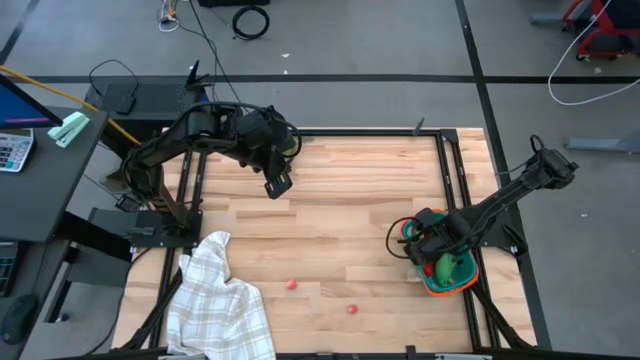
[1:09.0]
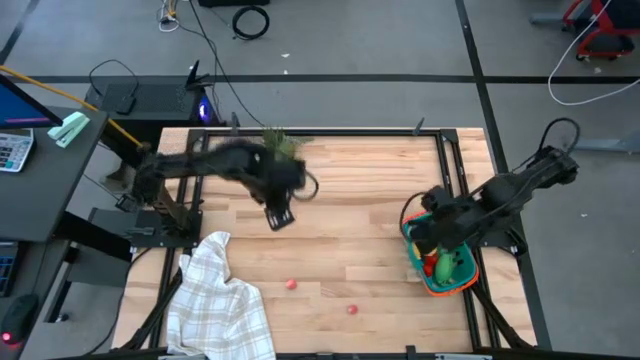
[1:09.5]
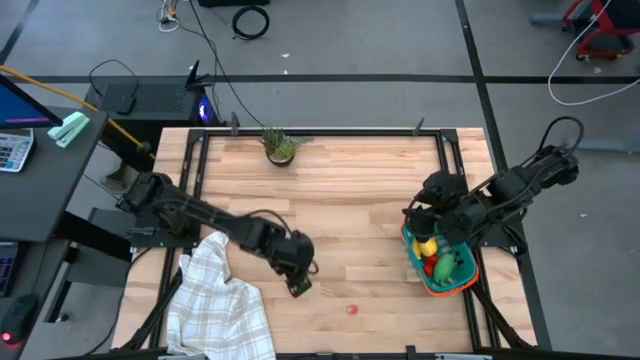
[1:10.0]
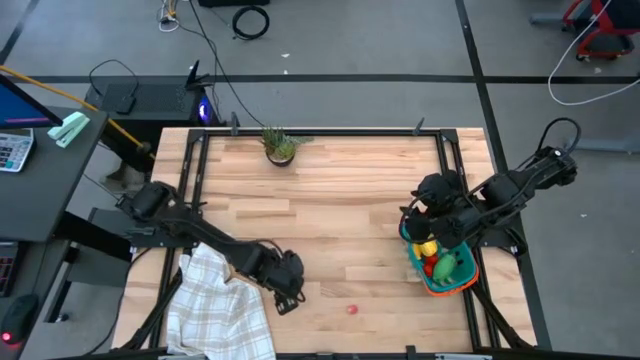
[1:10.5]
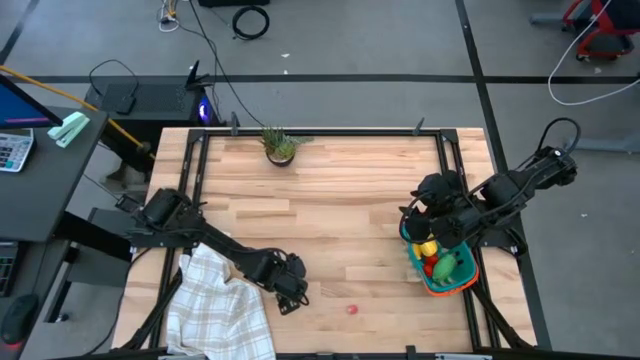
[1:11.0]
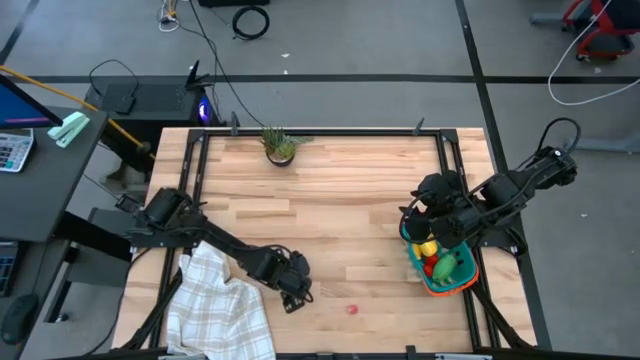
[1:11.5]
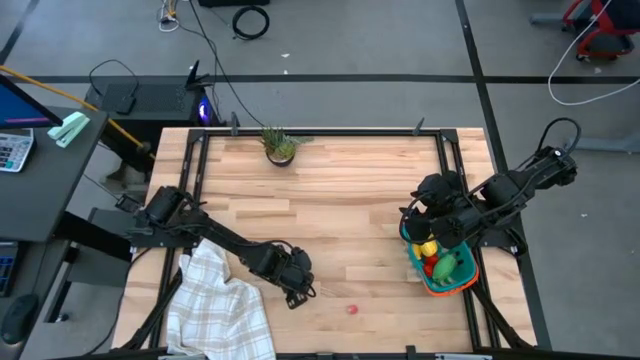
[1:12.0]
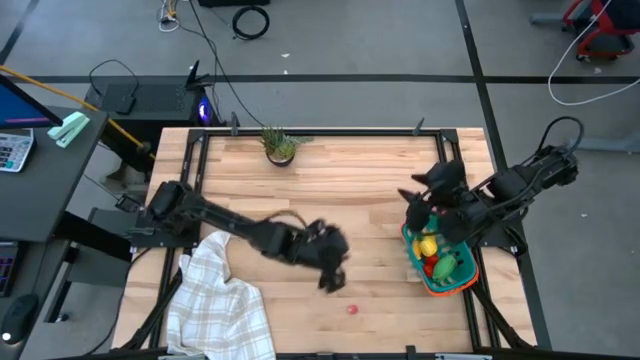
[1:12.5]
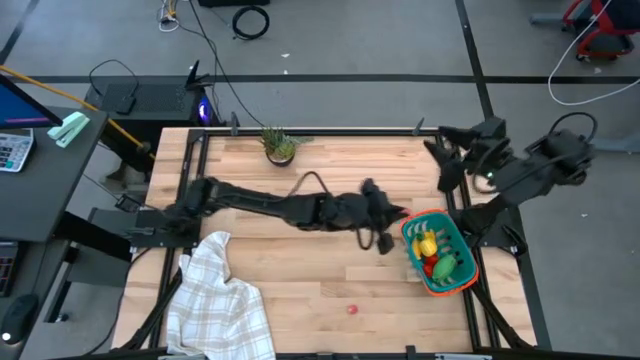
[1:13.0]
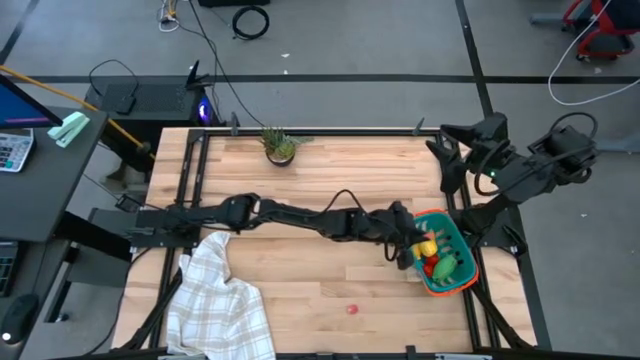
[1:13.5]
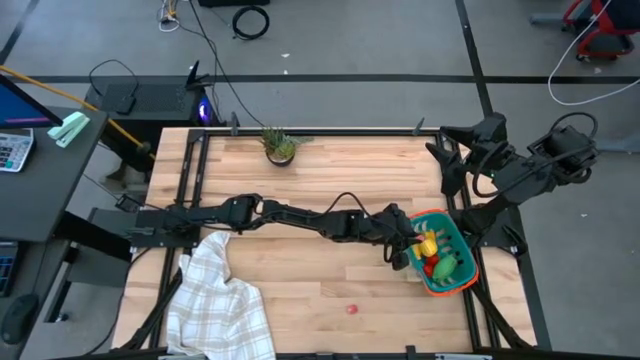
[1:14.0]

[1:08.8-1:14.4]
Task: Pick and placing Produce into tupperware
Put the left pink peach into the blue basket

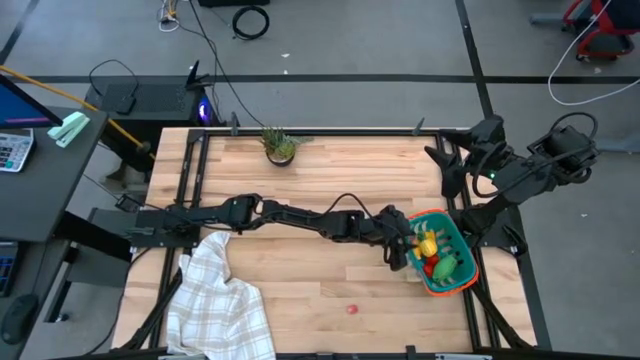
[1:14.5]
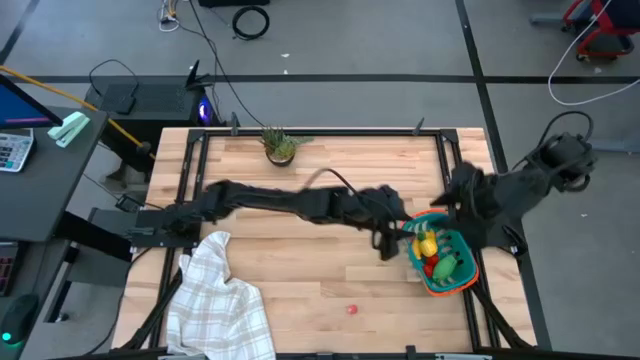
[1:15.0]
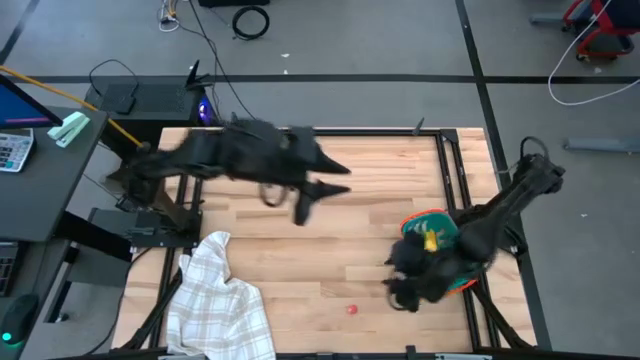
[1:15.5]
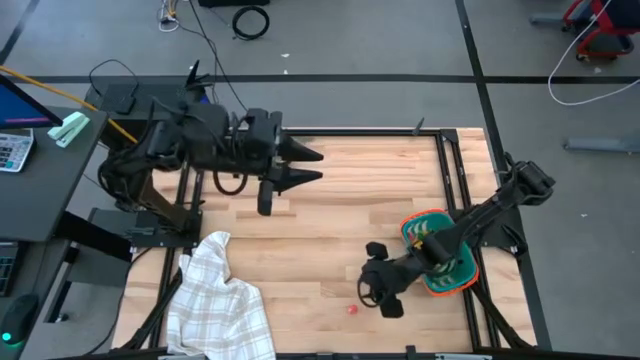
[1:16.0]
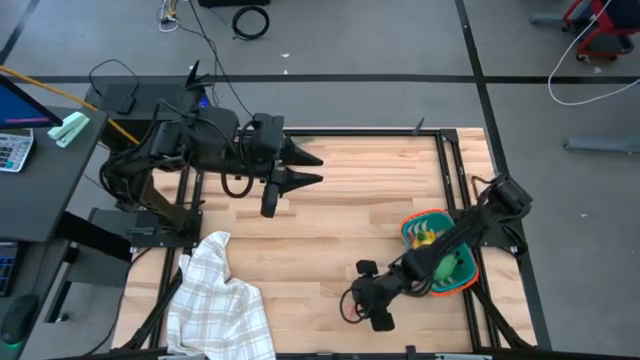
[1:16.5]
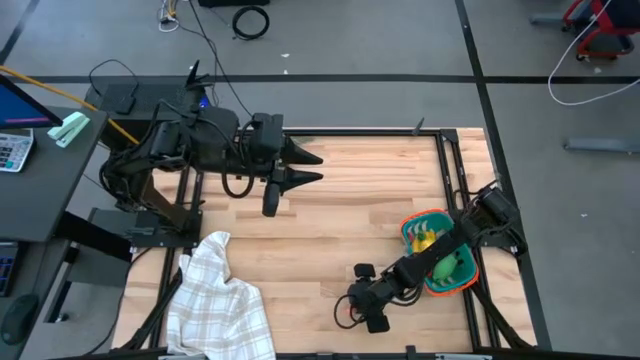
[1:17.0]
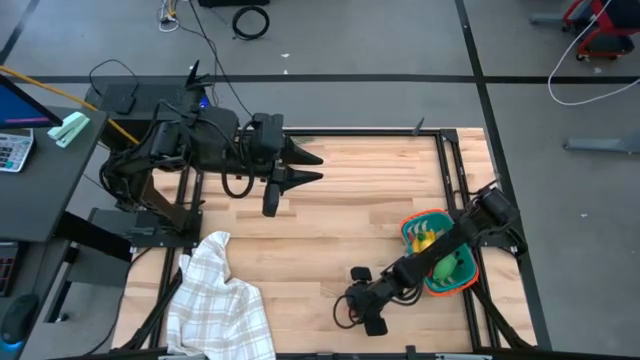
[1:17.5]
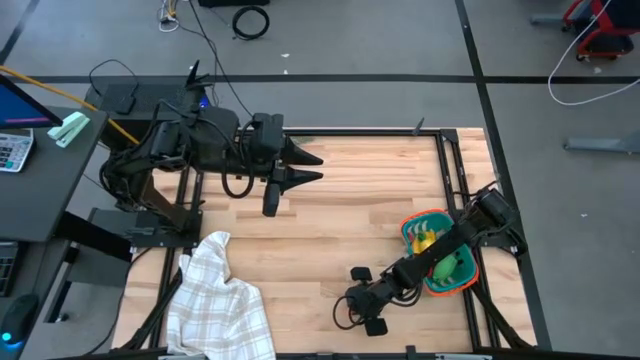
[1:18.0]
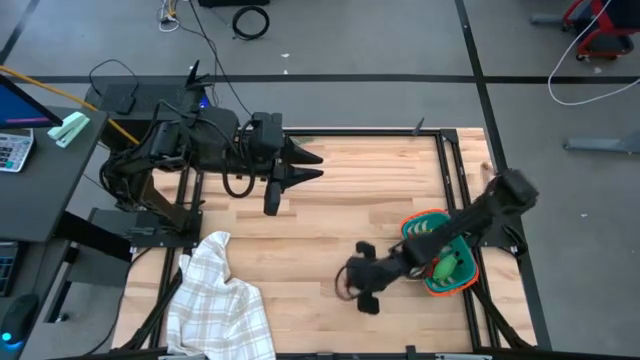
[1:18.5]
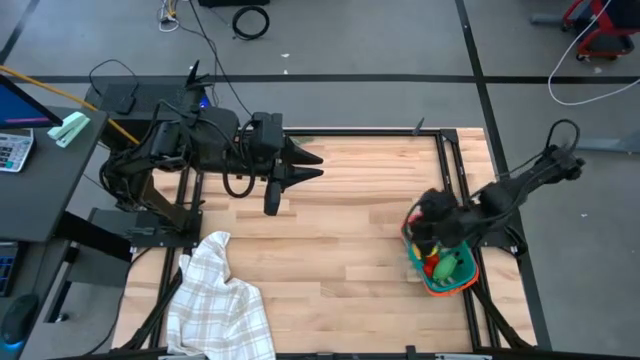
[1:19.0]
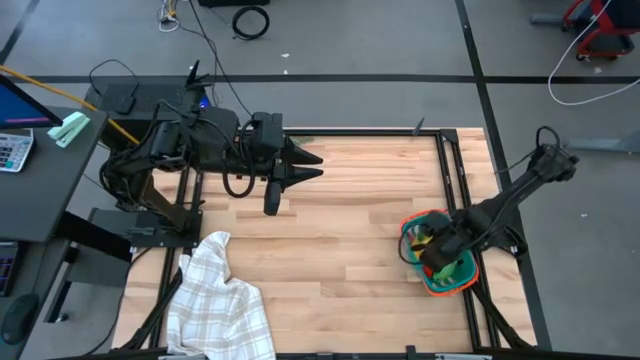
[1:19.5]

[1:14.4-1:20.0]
Put the pink peach into the blue basket

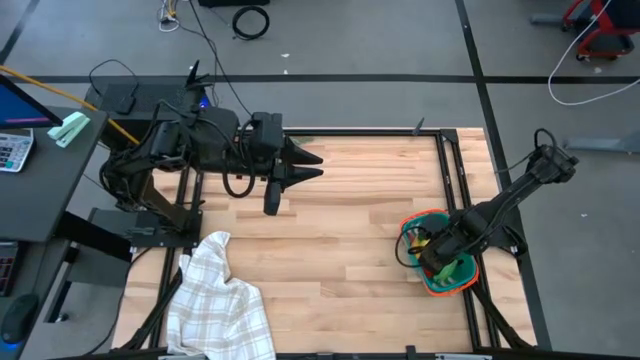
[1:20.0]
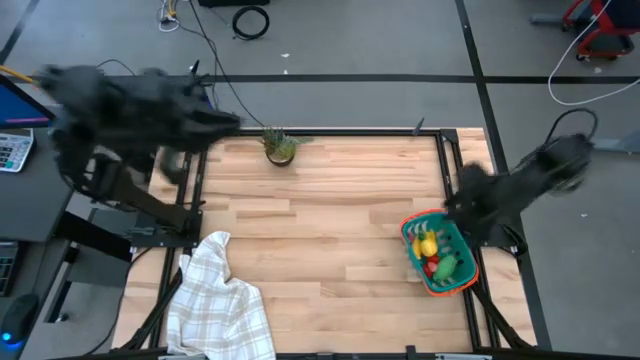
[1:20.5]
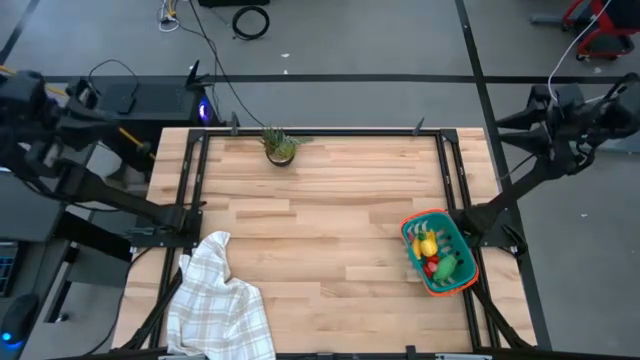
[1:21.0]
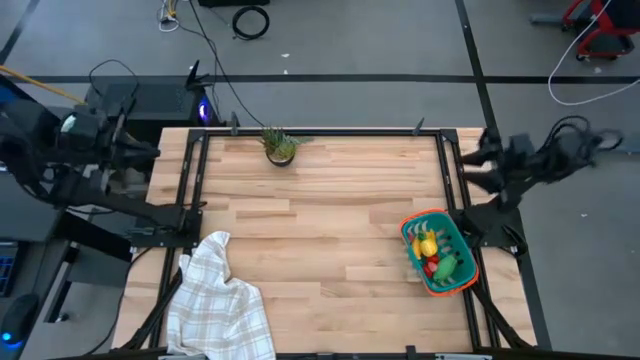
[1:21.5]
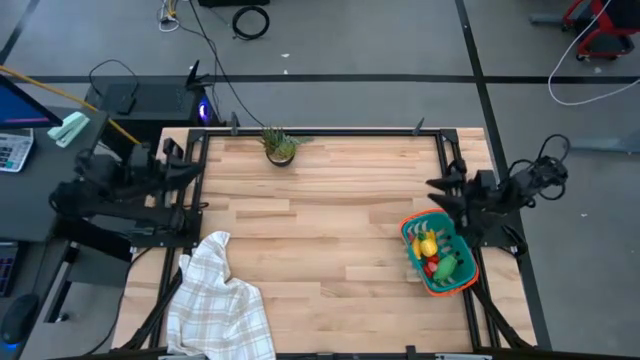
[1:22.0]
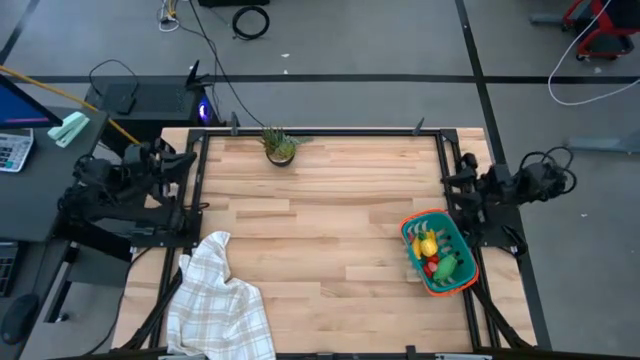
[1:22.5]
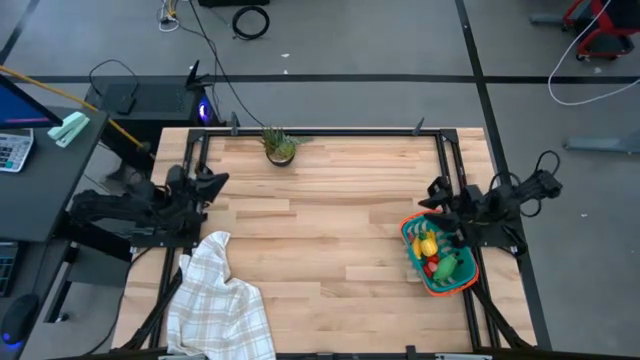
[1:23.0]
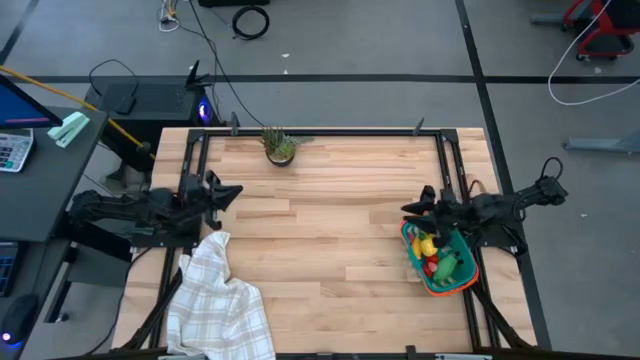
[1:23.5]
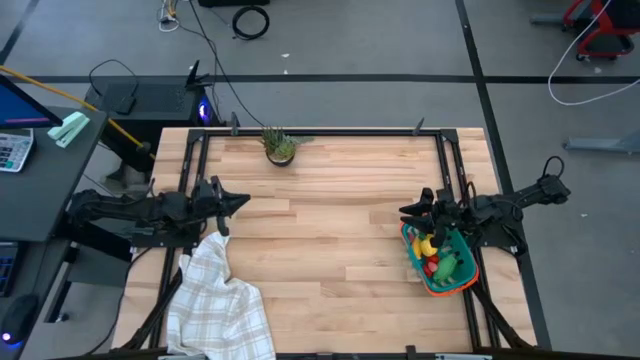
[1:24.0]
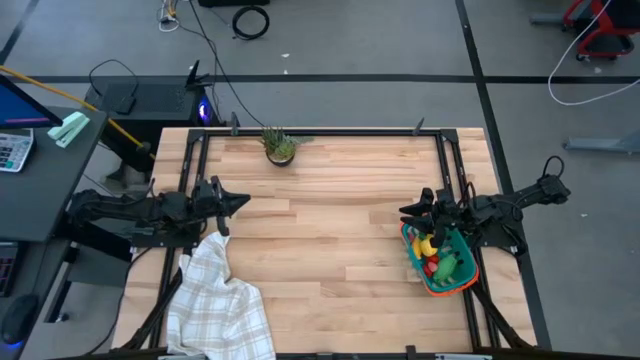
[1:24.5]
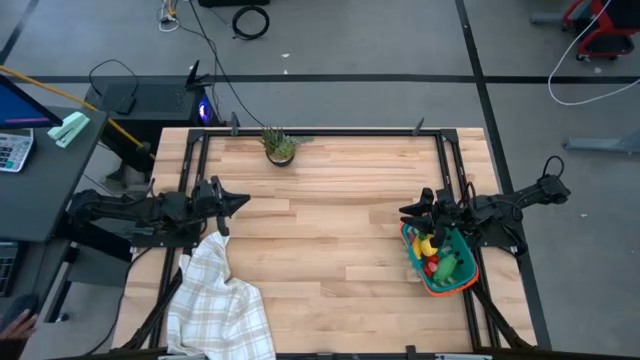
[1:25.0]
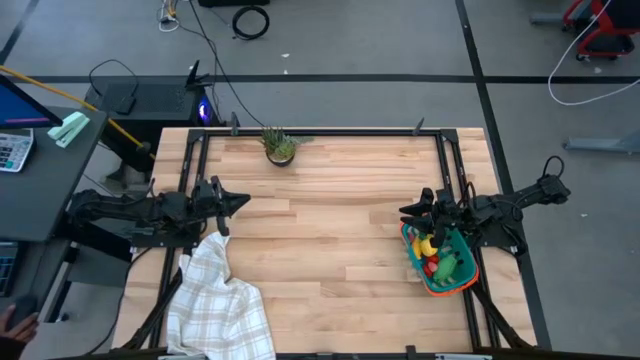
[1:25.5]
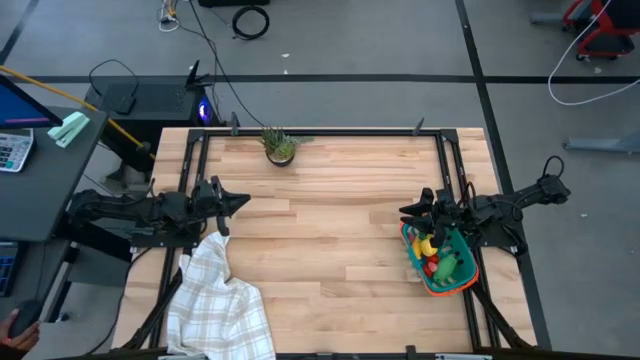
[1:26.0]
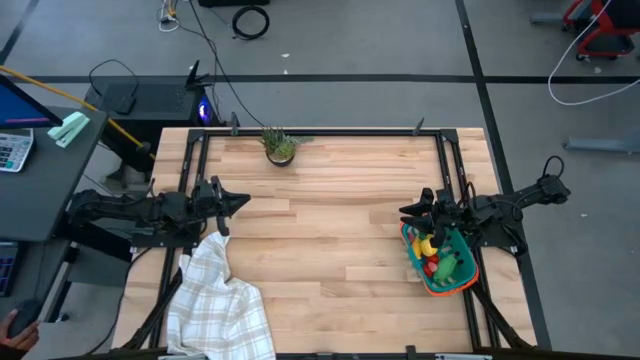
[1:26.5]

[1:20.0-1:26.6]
Return to Home Position
